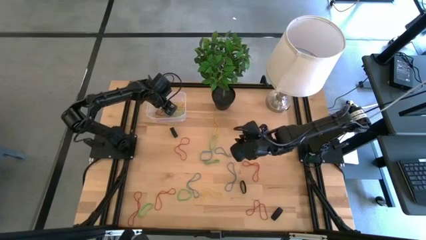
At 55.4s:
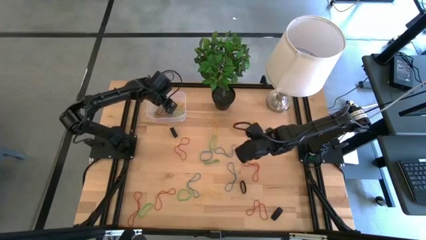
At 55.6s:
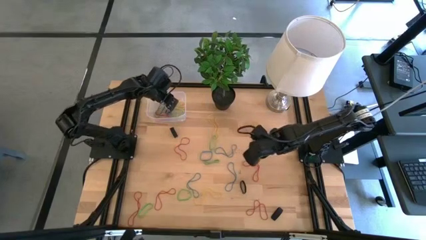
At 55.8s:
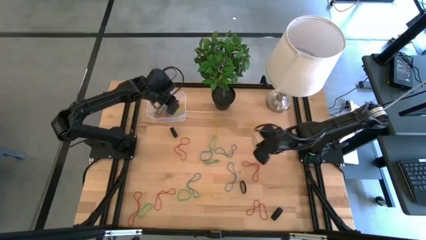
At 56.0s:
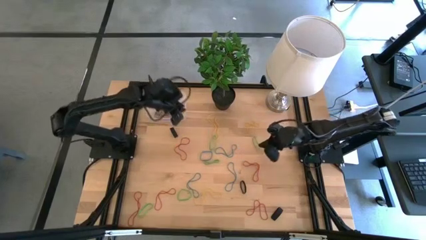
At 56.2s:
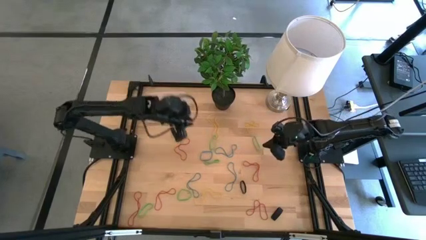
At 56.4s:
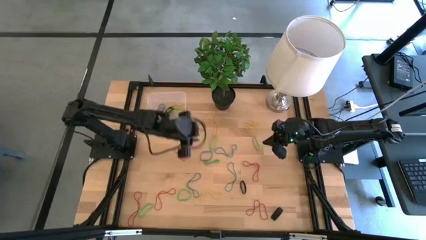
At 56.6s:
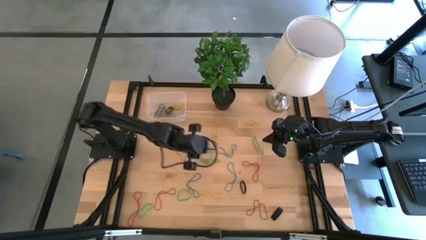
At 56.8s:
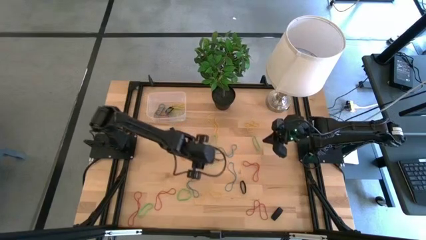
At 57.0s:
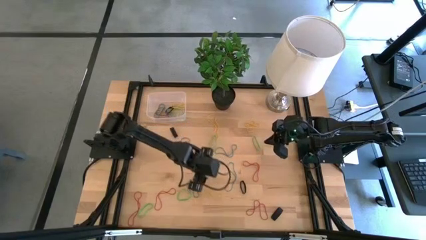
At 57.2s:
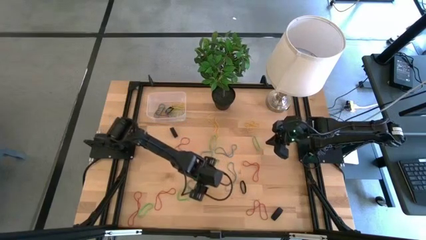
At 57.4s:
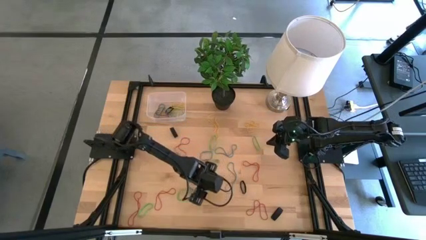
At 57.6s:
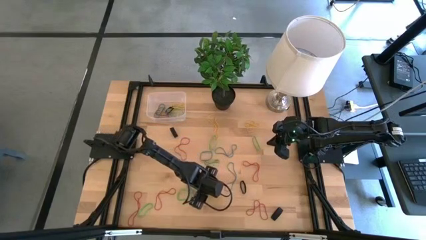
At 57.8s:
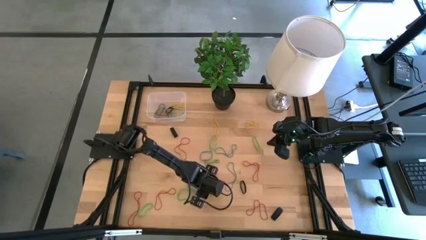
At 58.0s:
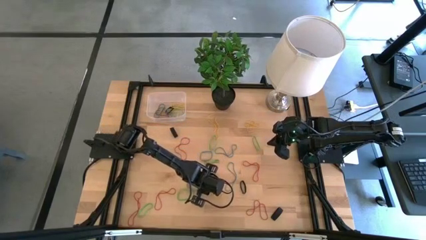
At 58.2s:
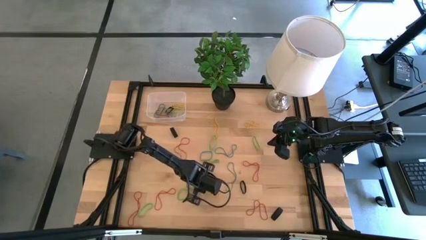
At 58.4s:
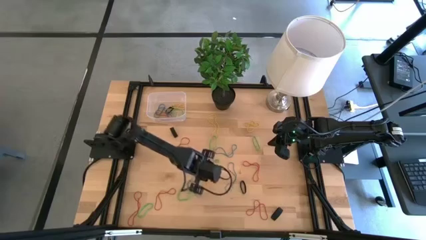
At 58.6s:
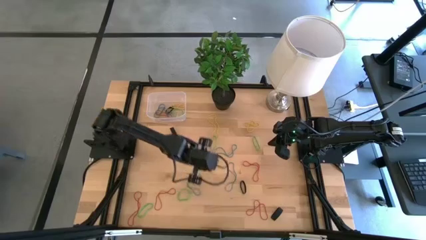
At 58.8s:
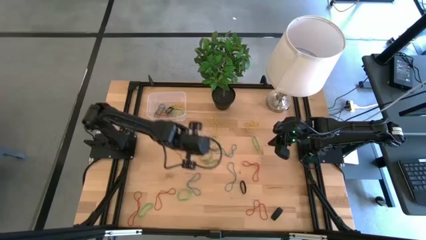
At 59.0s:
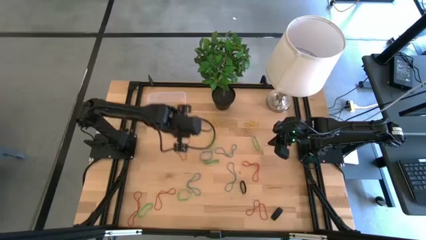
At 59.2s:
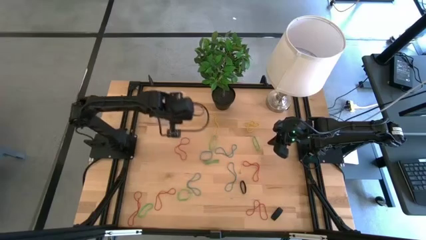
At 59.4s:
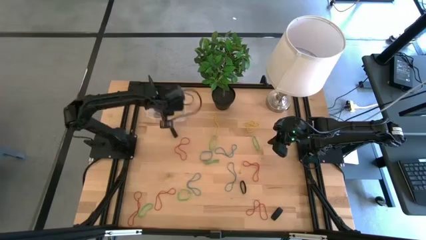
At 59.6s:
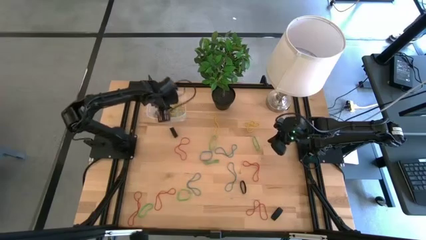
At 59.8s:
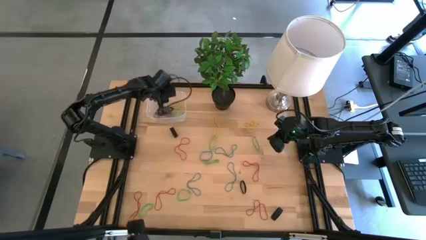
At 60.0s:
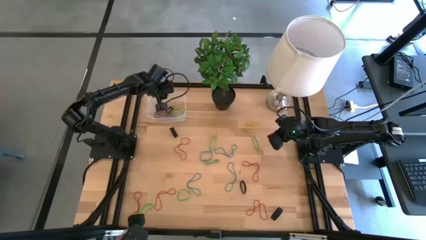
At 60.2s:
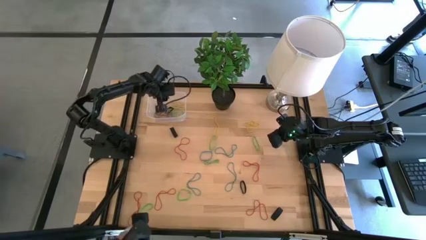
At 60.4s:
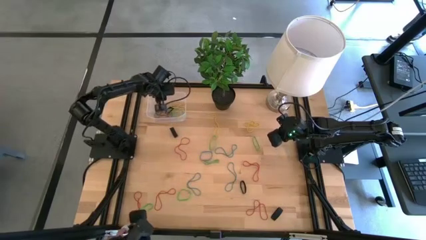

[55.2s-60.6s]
Task: Pick and place rubber bands into bin
Put the yellow rubber band into the transparent bin

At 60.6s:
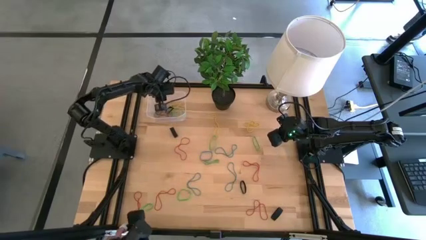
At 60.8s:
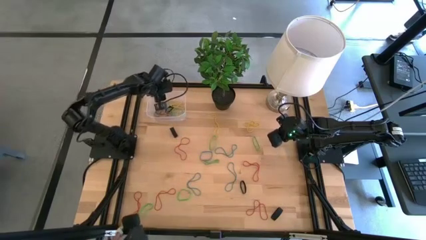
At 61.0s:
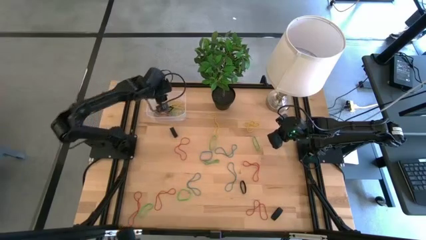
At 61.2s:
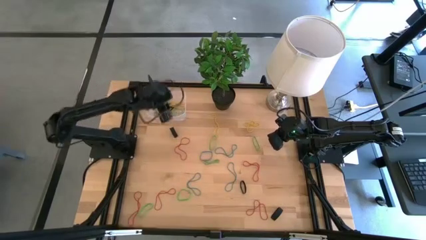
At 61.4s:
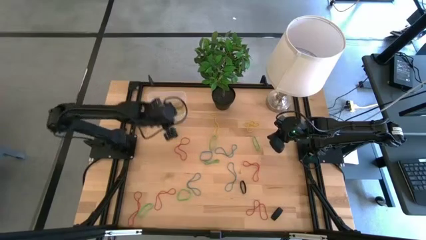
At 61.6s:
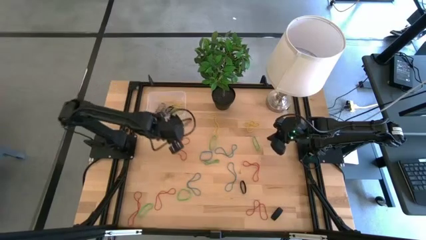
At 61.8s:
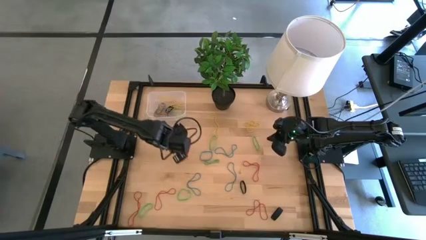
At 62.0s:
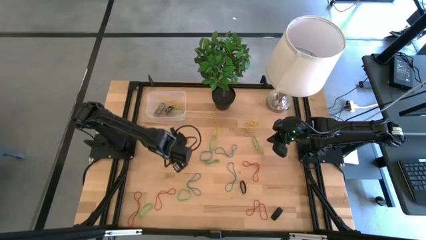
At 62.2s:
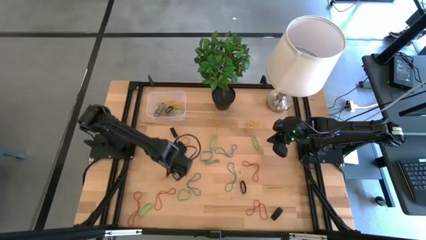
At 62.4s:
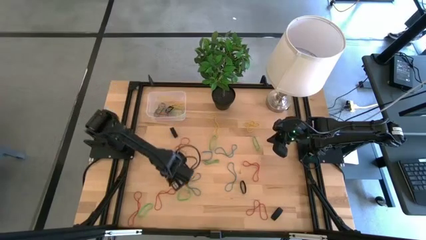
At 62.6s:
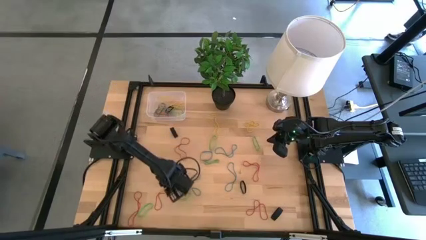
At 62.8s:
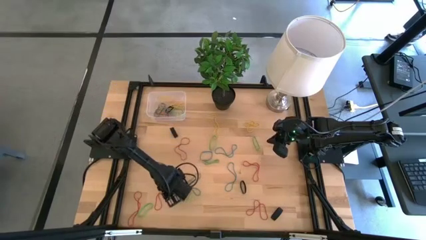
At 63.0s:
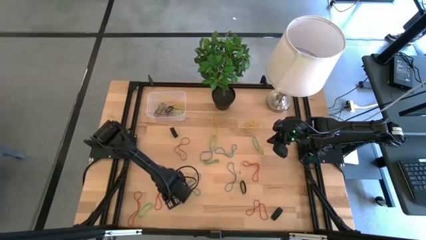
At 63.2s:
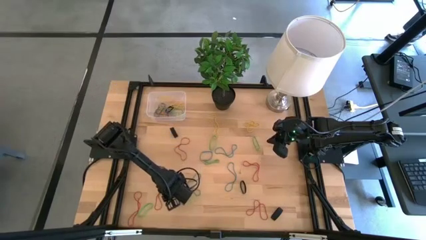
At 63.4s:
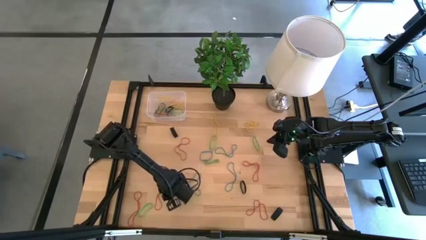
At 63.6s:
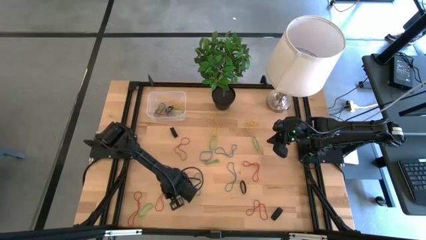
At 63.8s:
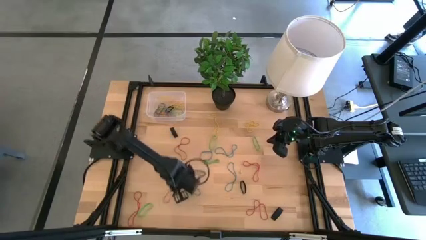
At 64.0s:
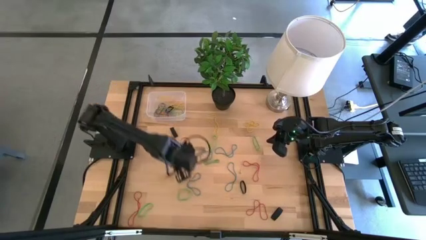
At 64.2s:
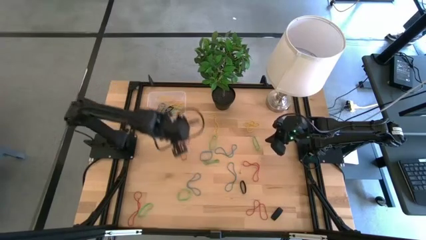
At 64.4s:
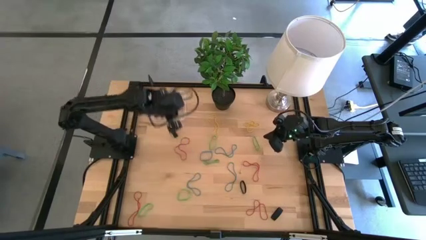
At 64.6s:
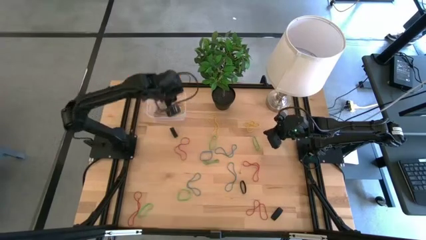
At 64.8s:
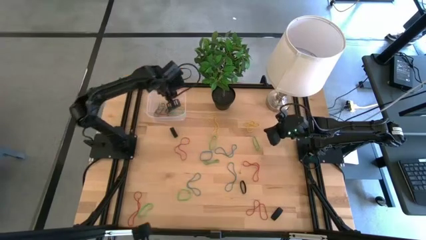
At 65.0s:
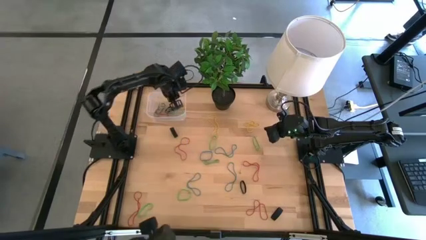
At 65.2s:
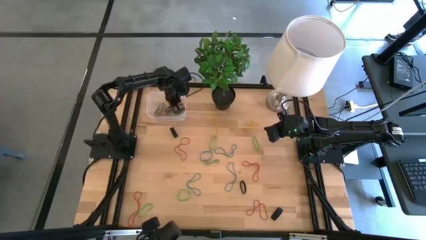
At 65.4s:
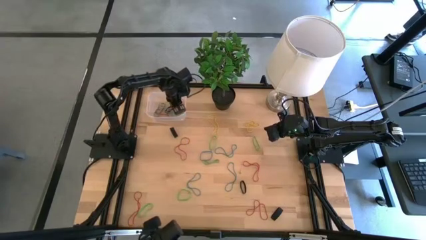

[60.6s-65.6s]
Put the red rubber band into the transparent bin

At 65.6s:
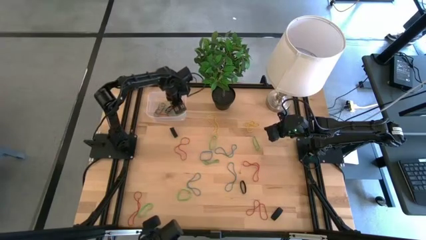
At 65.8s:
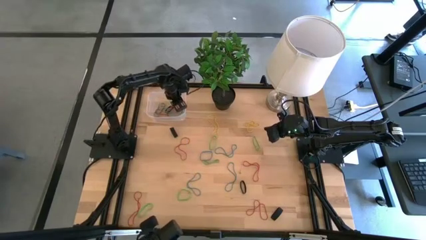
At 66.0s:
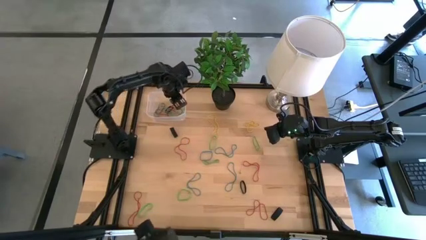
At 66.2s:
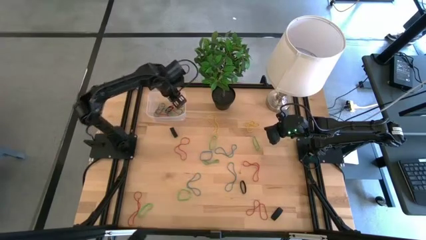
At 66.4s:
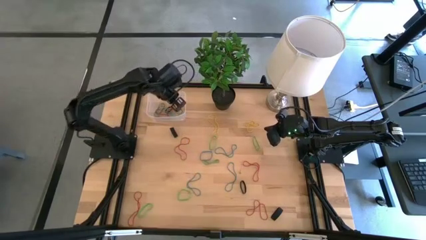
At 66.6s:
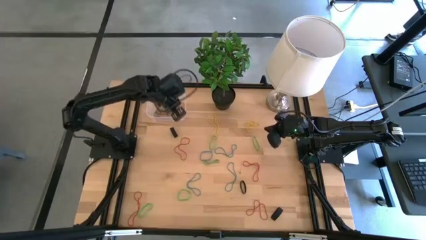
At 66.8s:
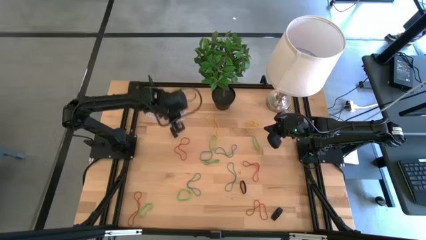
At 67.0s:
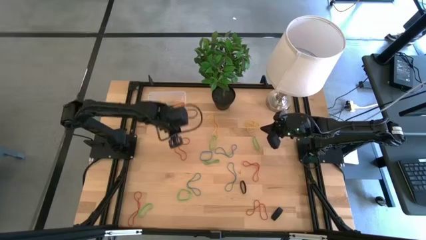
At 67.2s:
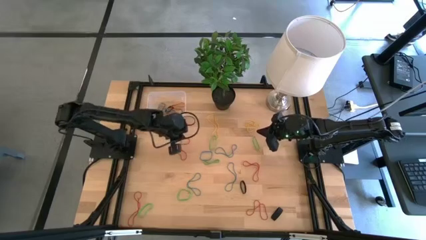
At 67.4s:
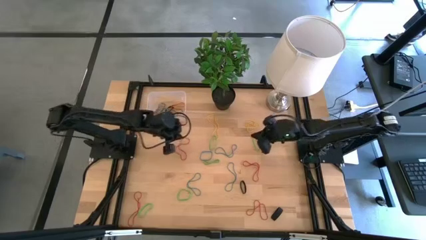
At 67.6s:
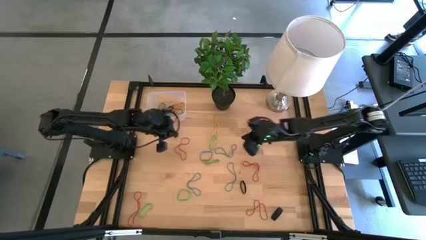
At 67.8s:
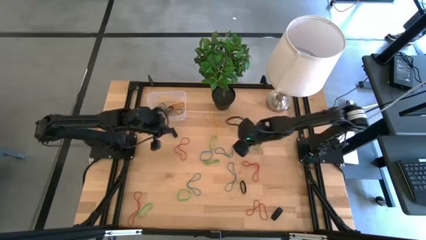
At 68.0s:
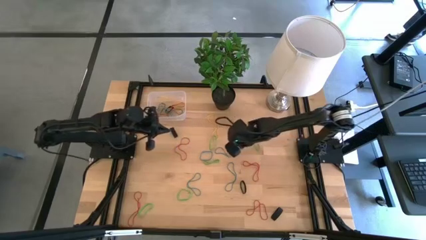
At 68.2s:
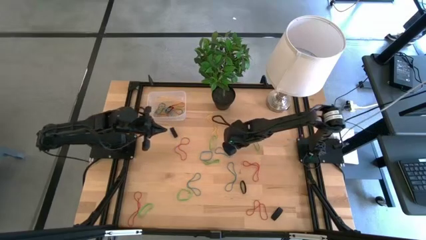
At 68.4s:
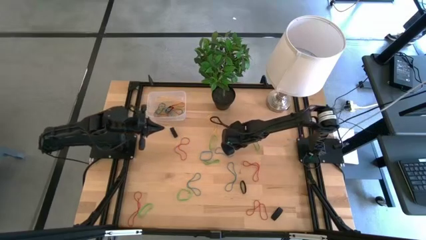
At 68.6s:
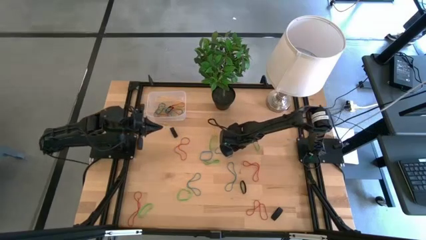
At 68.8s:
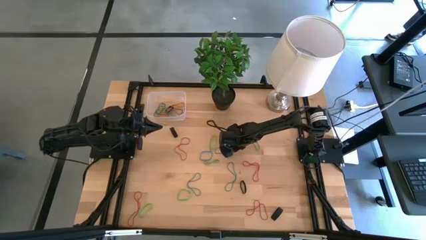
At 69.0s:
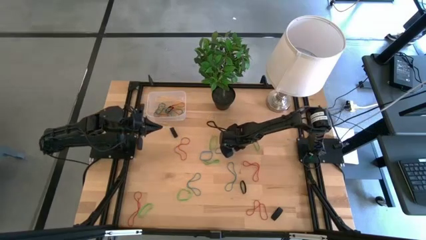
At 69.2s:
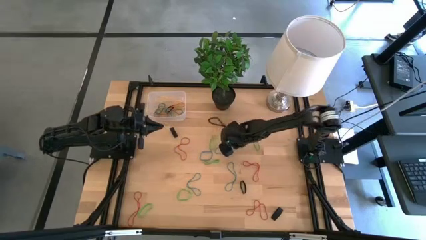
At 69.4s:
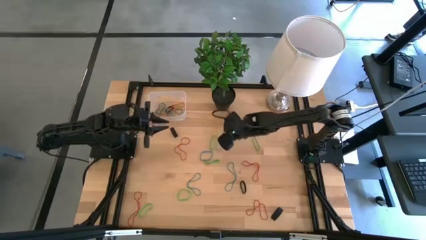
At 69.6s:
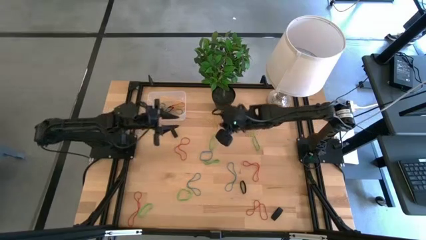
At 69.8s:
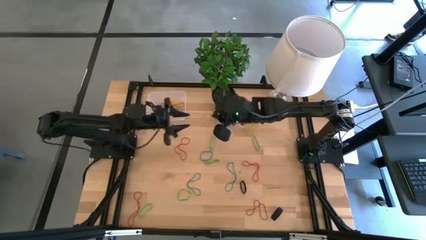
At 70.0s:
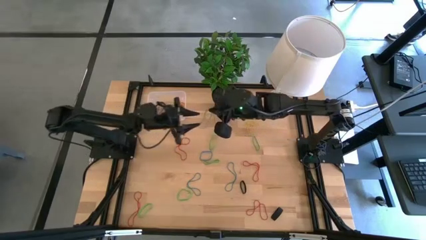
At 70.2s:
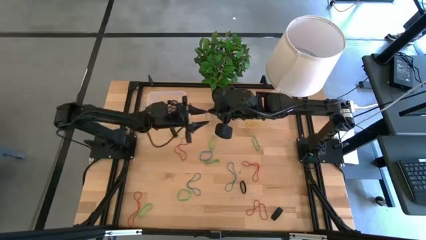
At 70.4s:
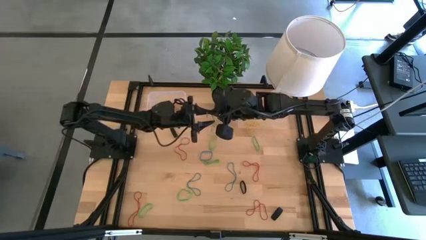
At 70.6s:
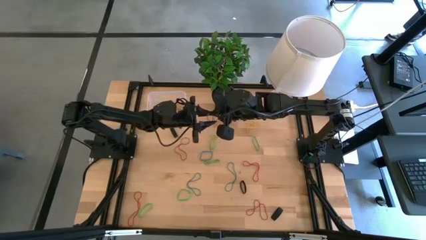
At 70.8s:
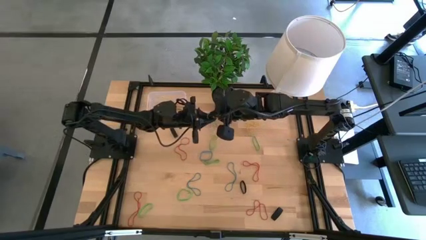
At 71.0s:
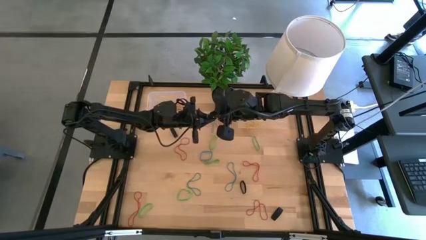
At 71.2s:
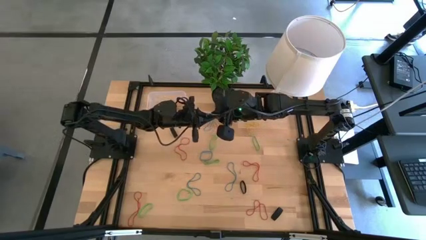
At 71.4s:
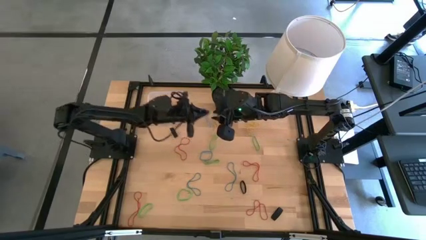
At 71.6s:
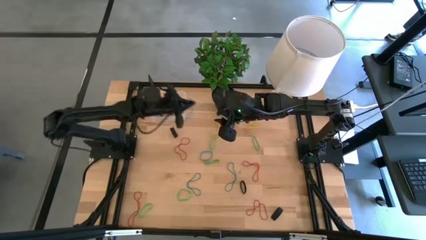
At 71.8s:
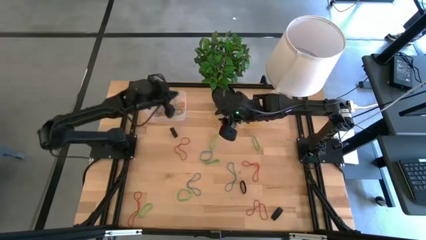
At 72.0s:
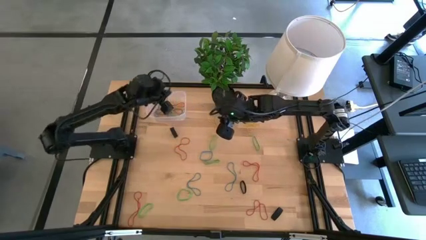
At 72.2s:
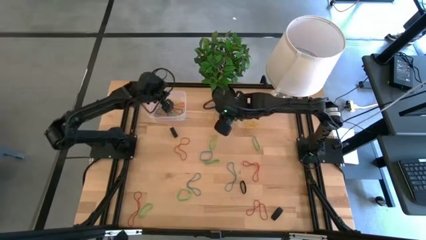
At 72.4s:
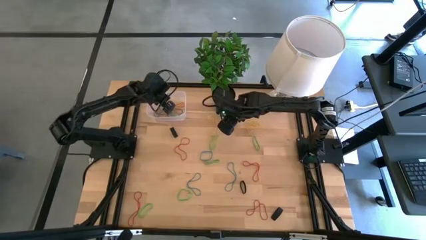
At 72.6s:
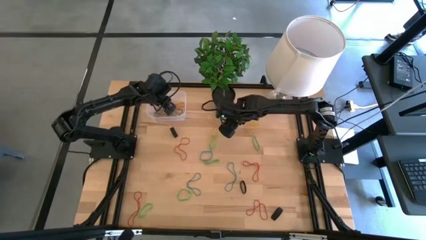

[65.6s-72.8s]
Put the blue rubber band into the transparent bin
